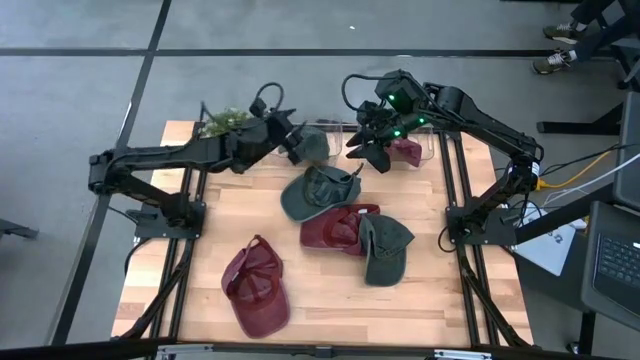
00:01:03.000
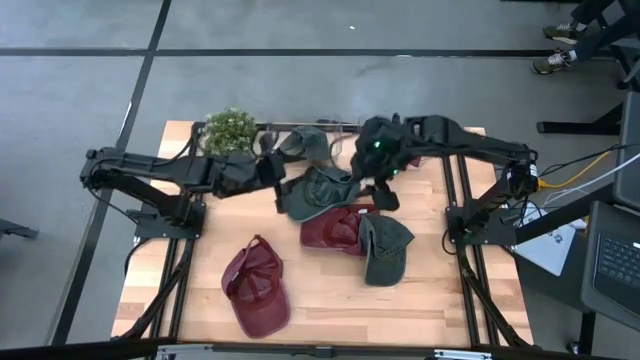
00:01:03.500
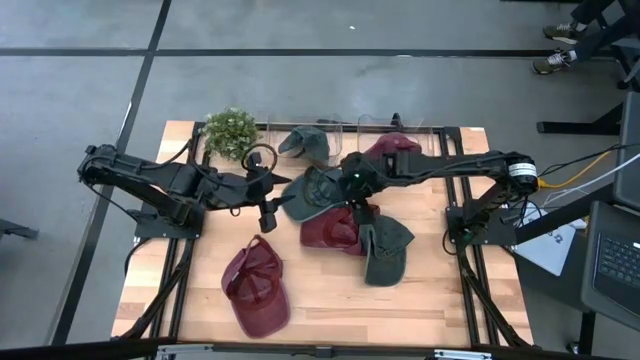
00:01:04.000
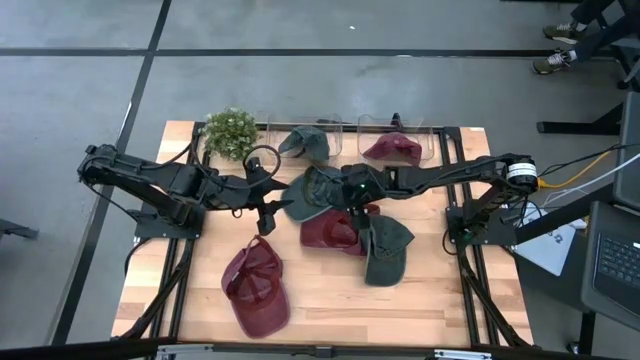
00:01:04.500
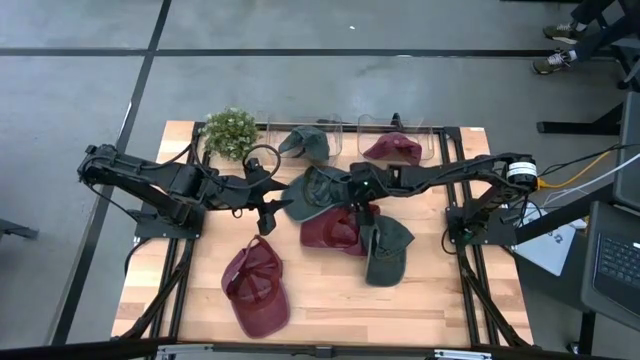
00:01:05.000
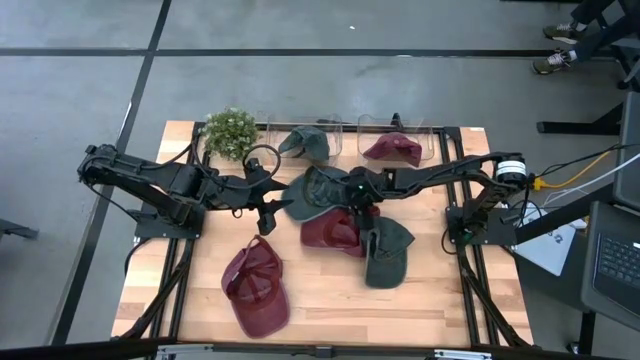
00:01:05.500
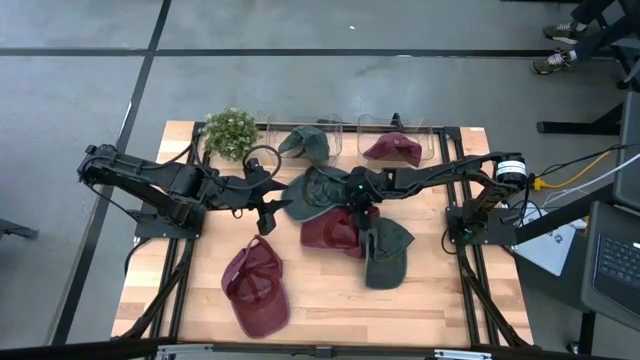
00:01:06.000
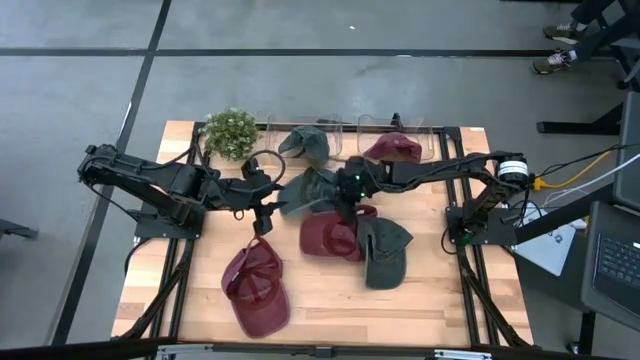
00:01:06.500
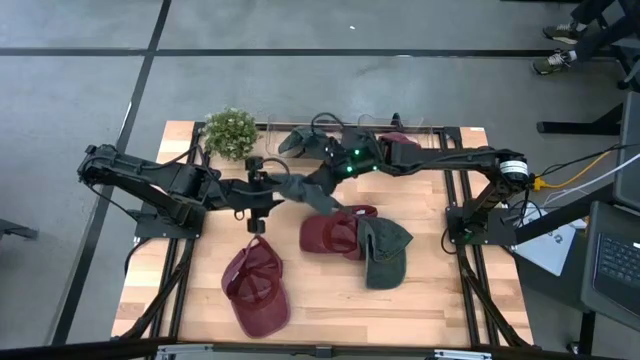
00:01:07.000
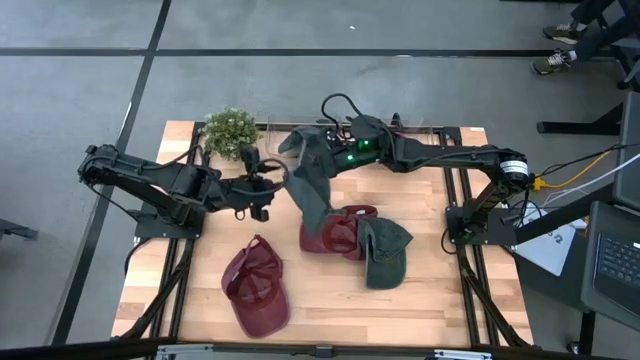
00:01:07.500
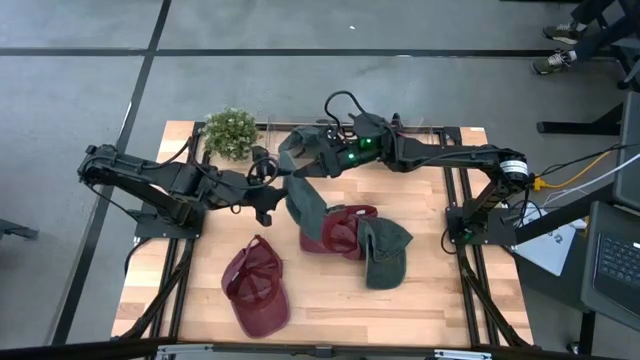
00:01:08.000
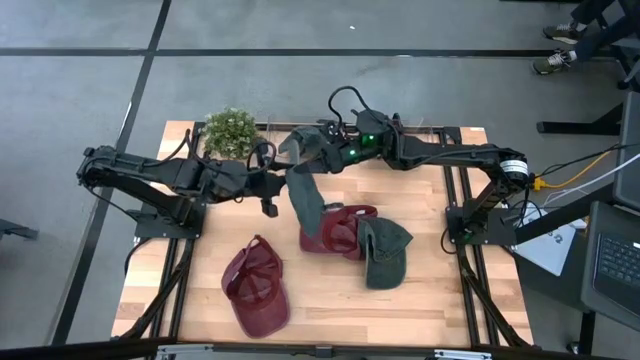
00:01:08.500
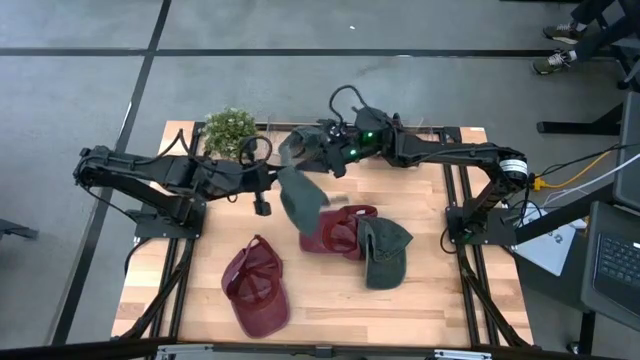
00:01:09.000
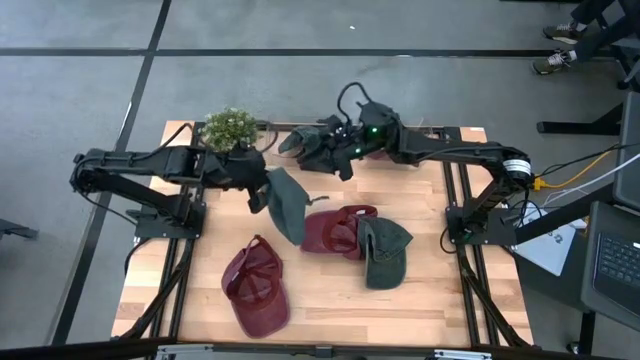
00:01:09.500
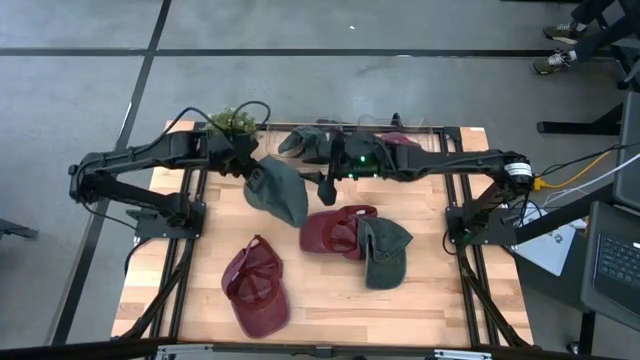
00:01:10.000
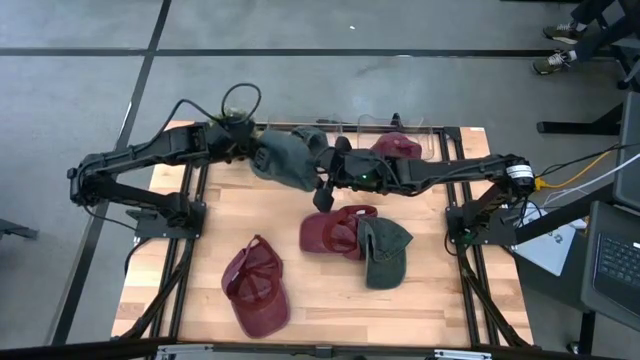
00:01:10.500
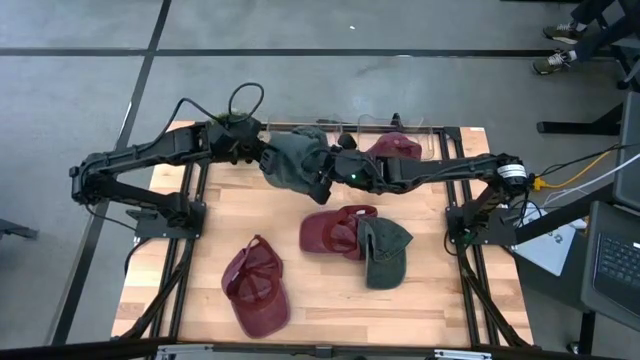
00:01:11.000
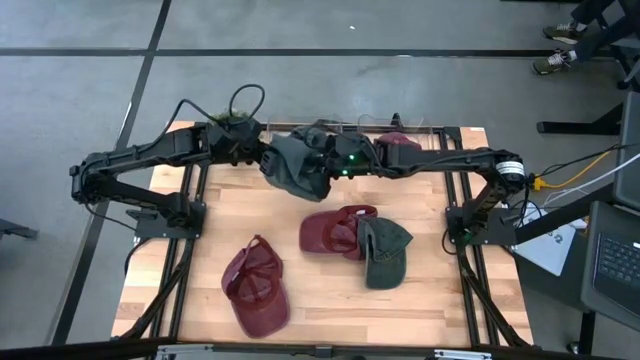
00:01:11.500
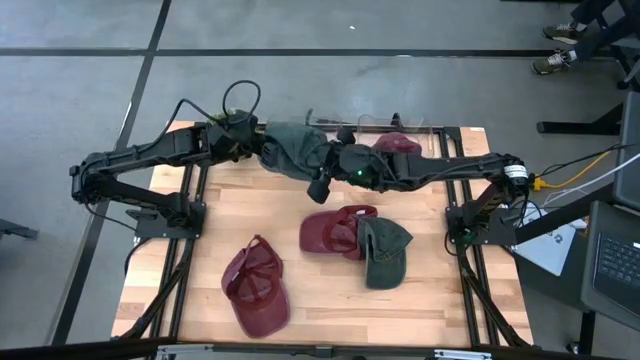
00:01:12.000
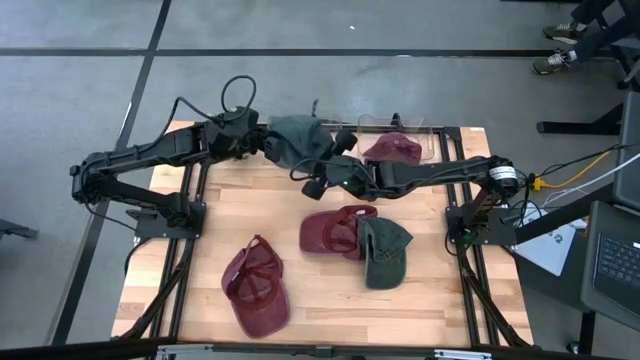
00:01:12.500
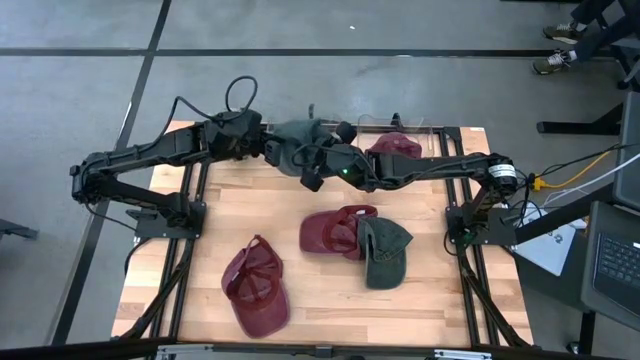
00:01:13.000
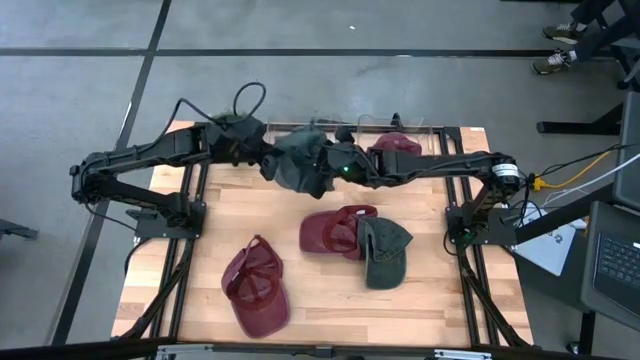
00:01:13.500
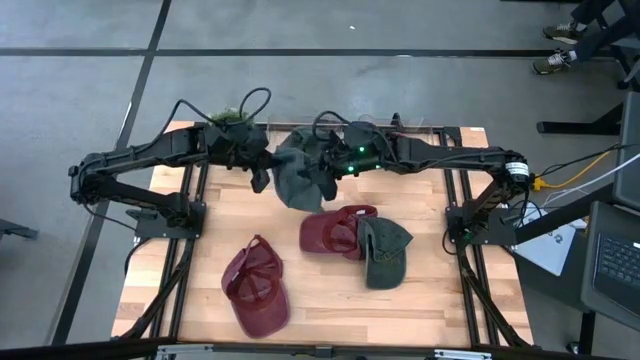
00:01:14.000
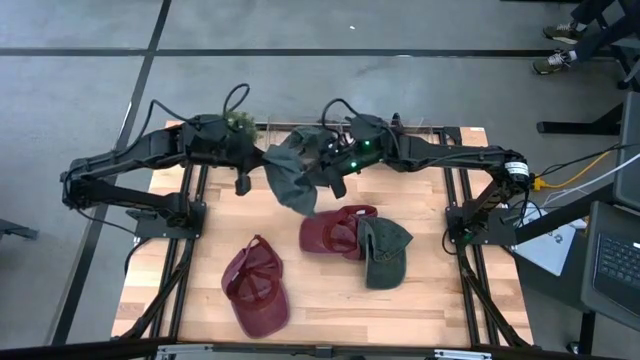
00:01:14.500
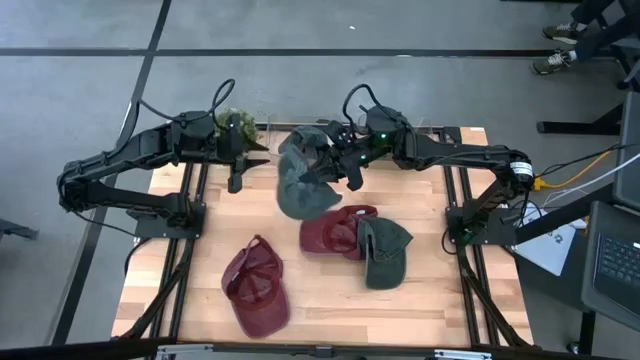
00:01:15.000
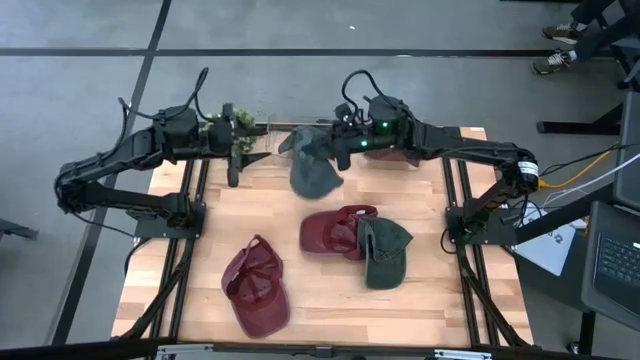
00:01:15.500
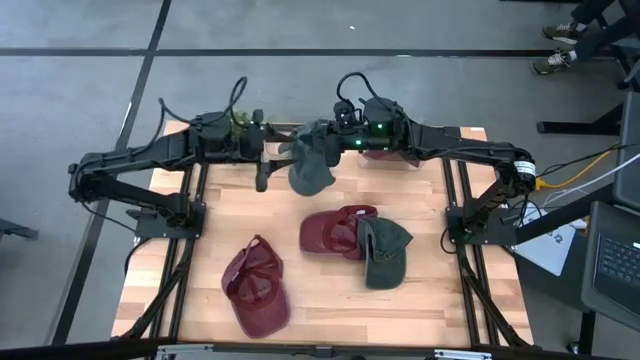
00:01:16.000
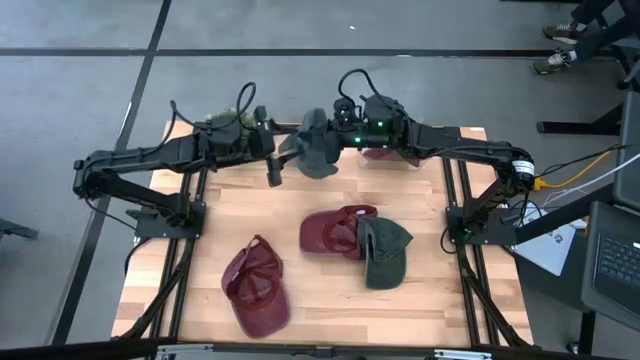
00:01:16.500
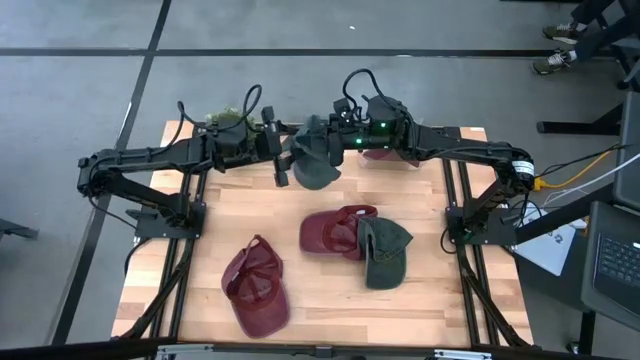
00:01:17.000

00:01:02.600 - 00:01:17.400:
Task: Pick & Place hat
Put the top gray cap on the gray cap into the left transparent bin

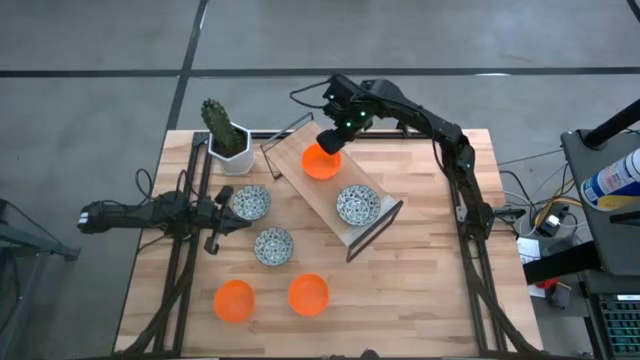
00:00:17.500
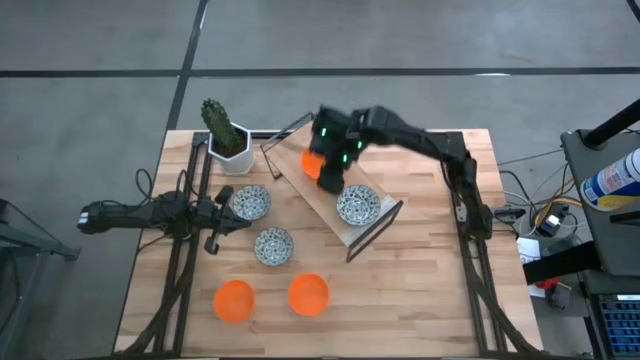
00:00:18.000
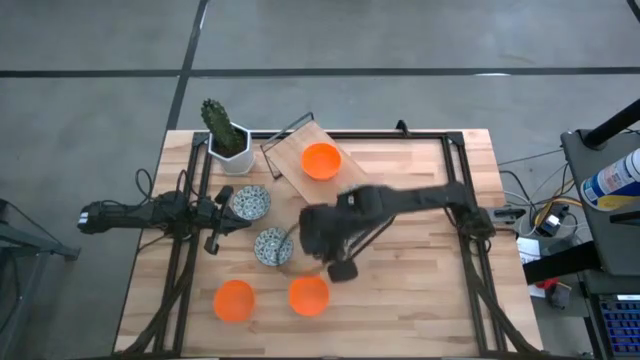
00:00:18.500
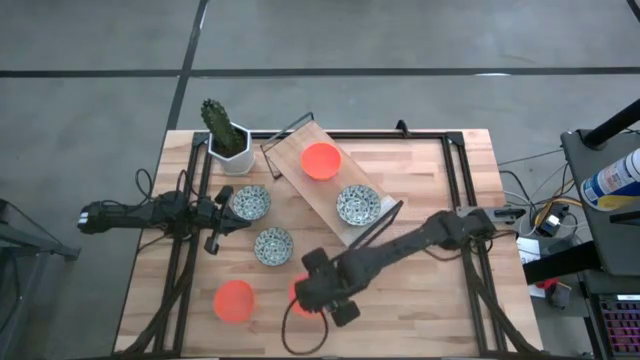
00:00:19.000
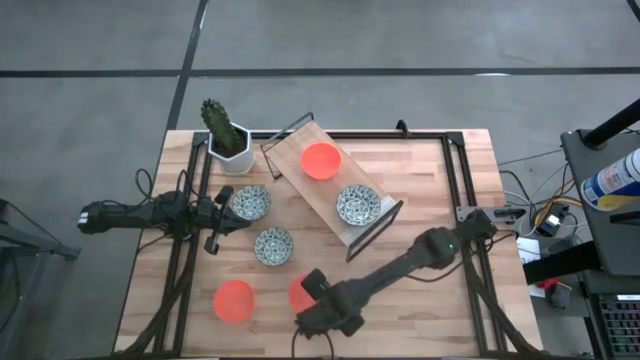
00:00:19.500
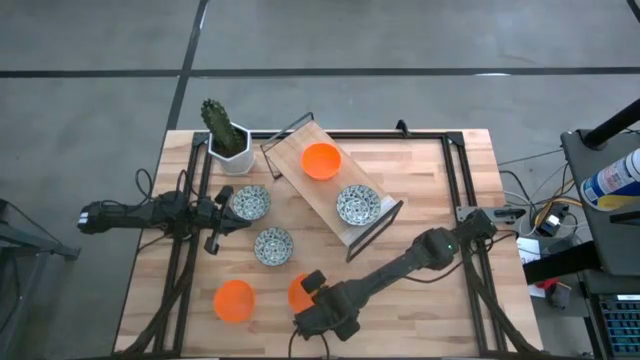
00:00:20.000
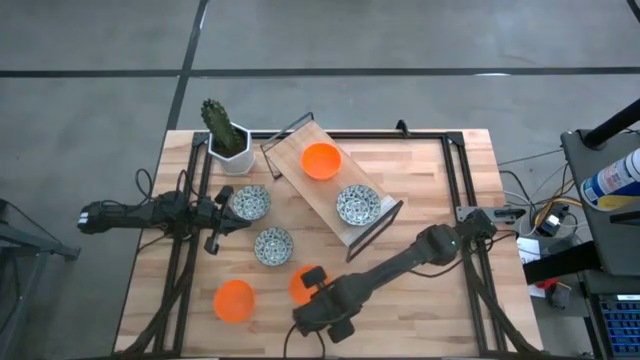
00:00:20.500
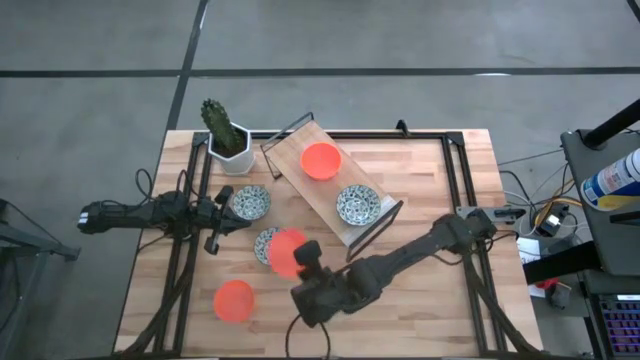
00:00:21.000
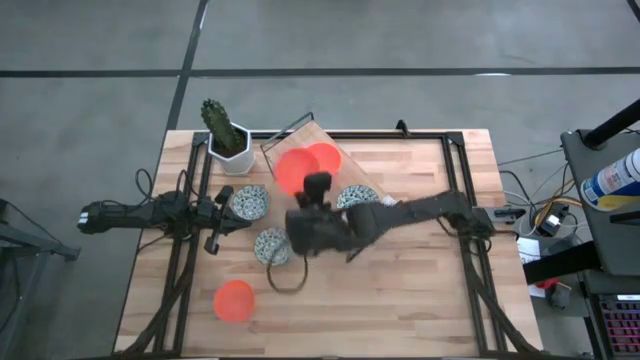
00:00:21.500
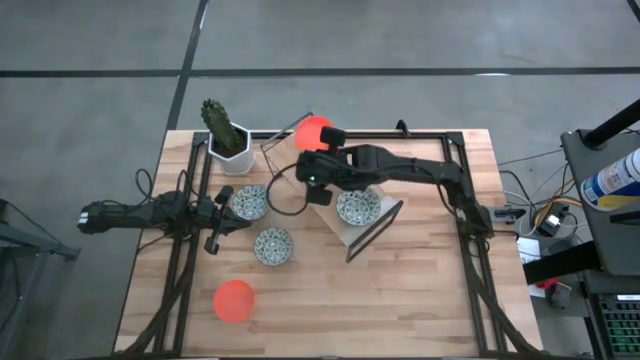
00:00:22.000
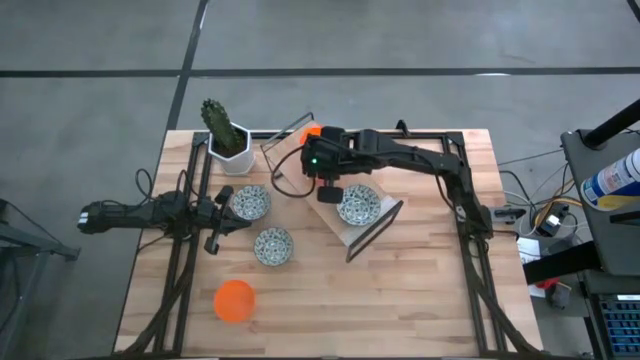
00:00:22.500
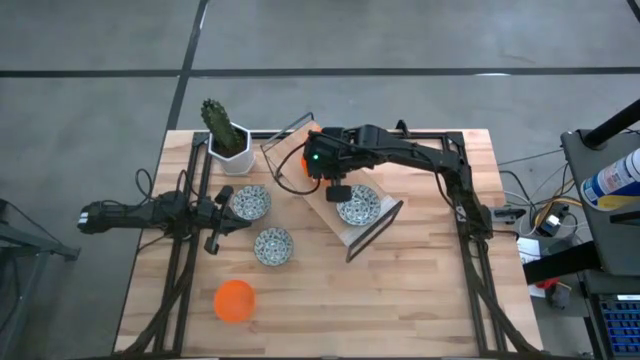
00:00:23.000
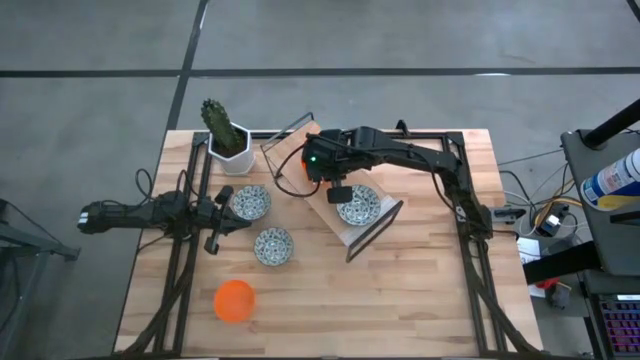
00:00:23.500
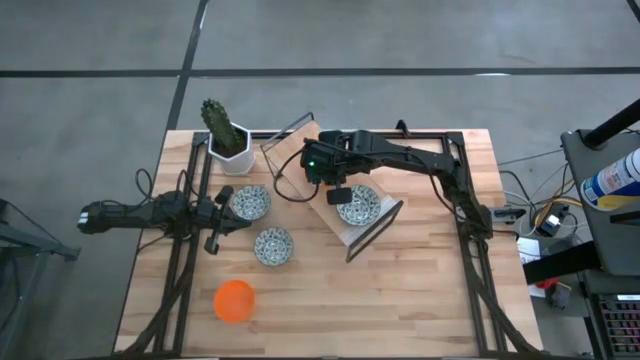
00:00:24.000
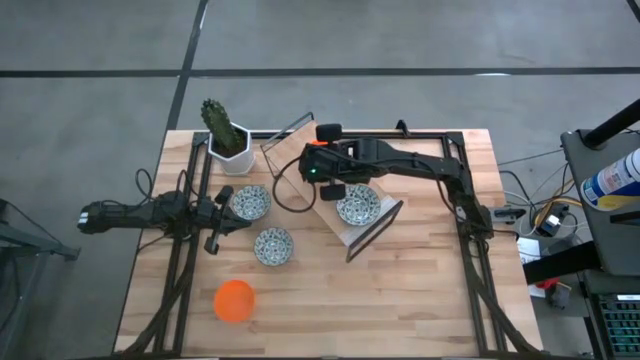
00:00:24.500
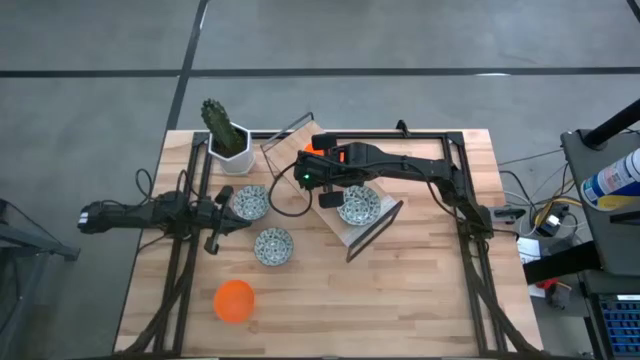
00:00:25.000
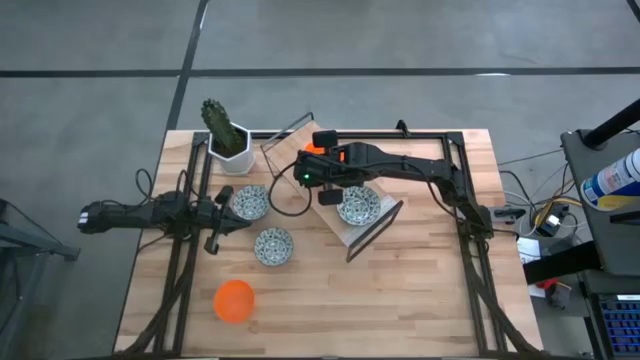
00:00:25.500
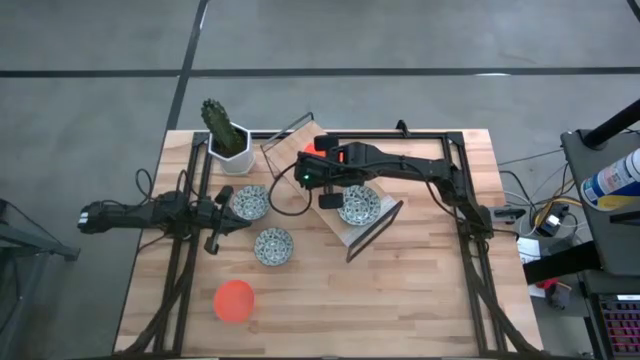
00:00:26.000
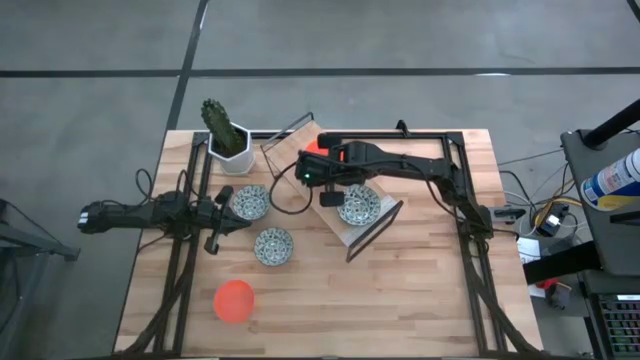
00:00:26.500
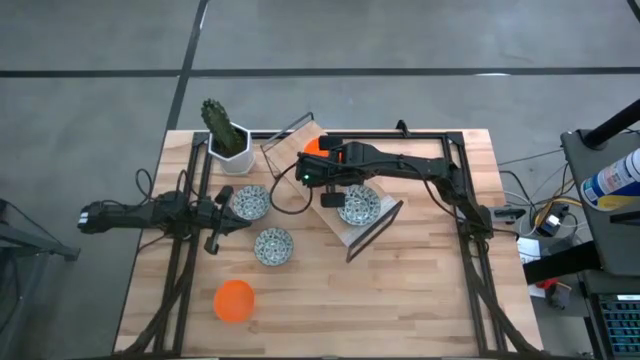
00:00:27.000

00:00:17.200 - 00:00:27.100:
Task: Pick & Place Mini bowls
Stack the right orange bowl on top of the orange bowl on the shelf
